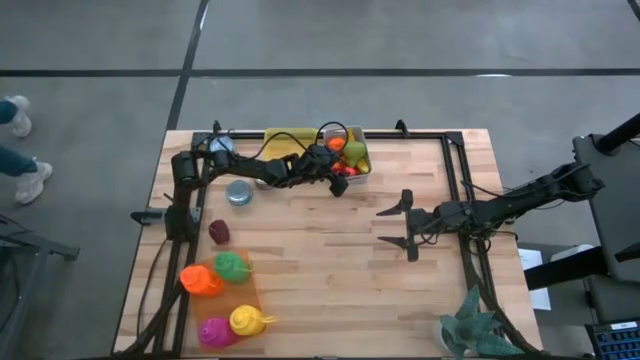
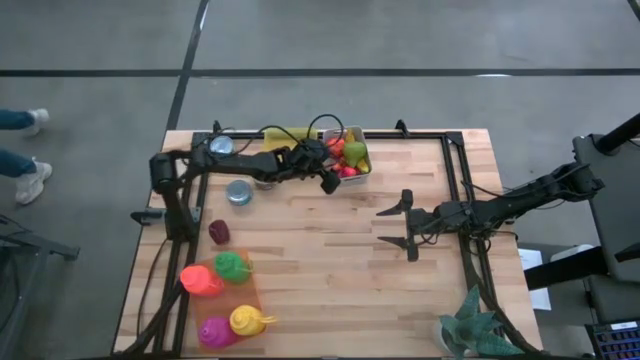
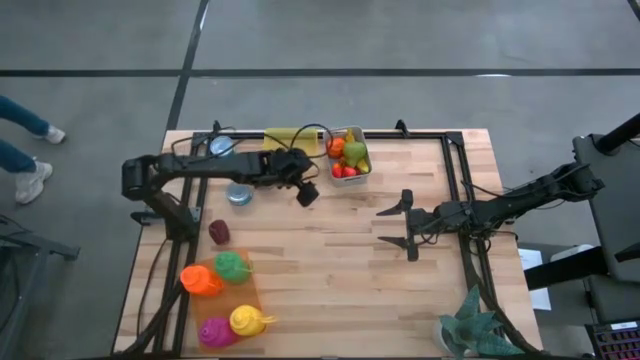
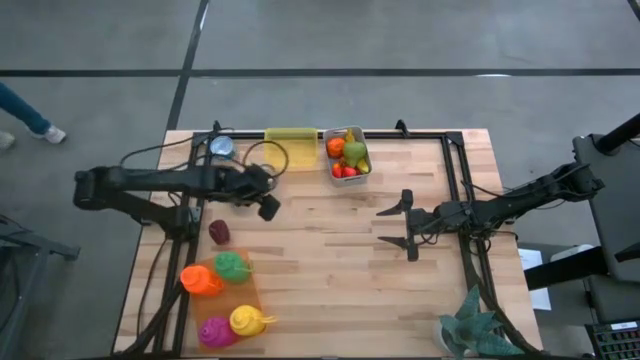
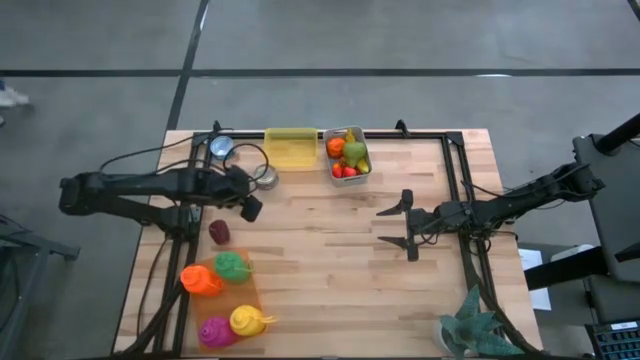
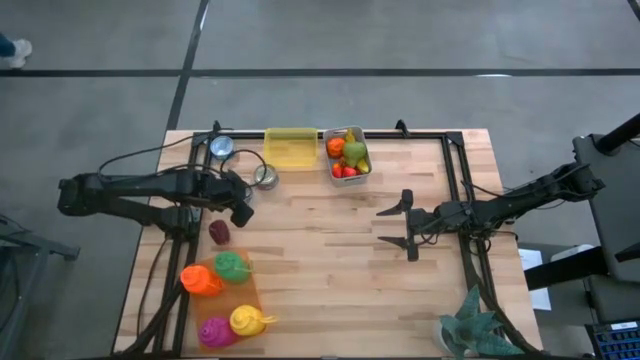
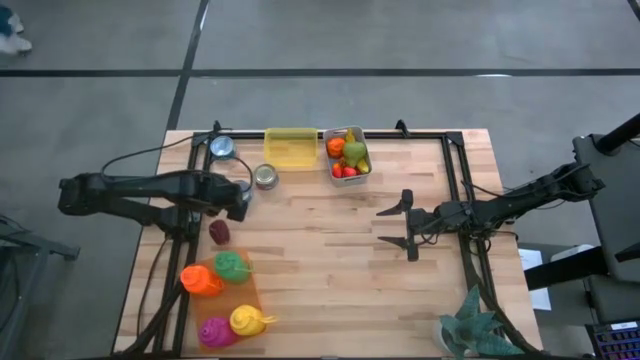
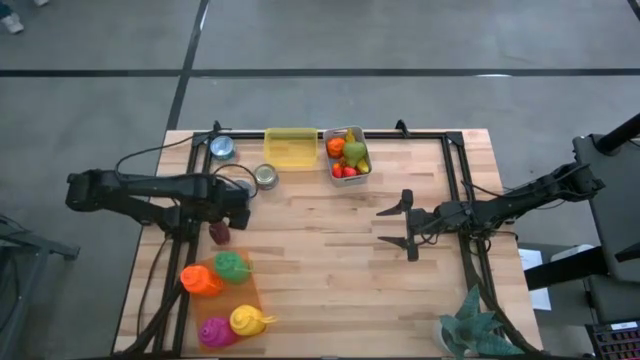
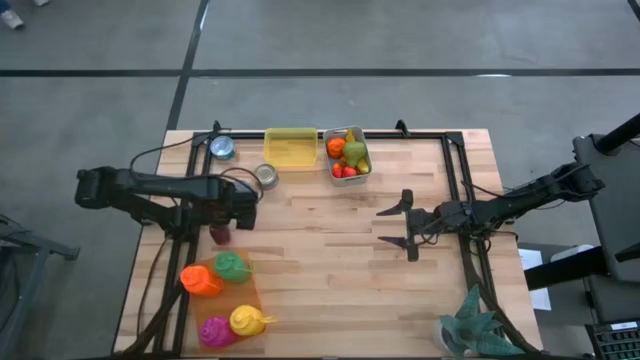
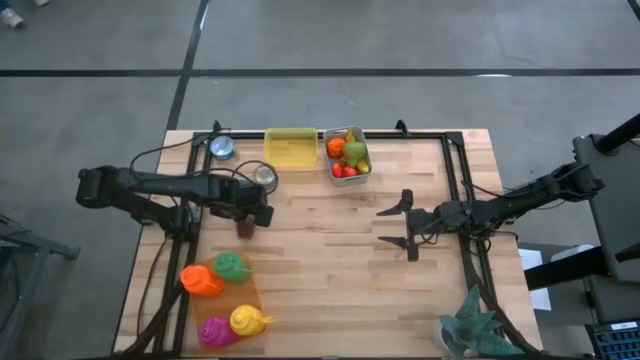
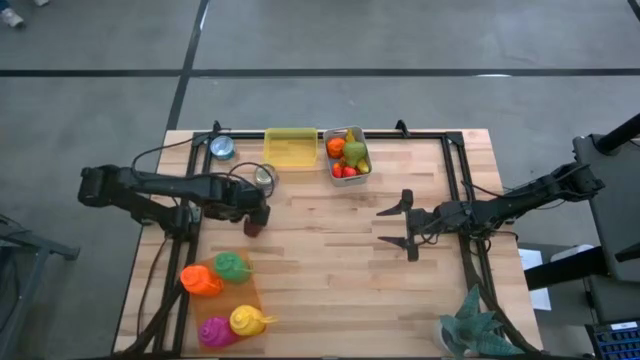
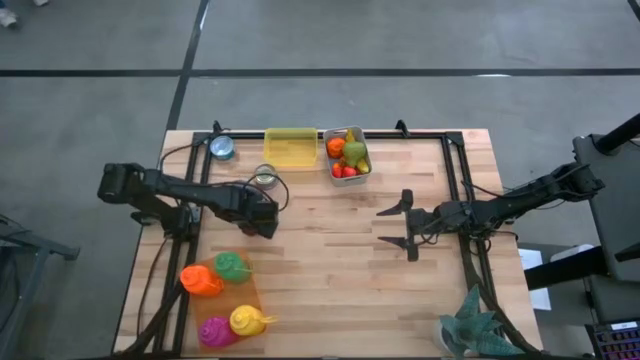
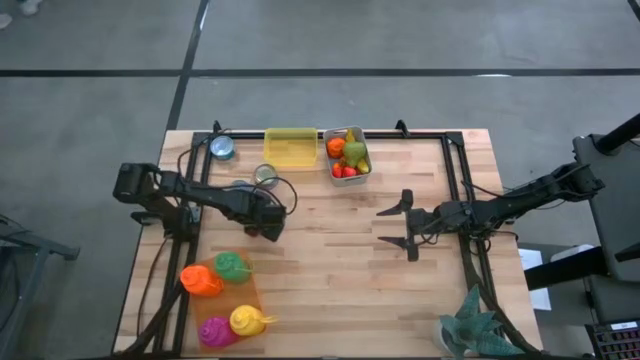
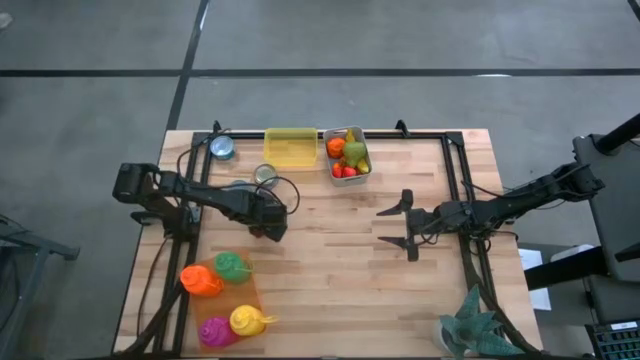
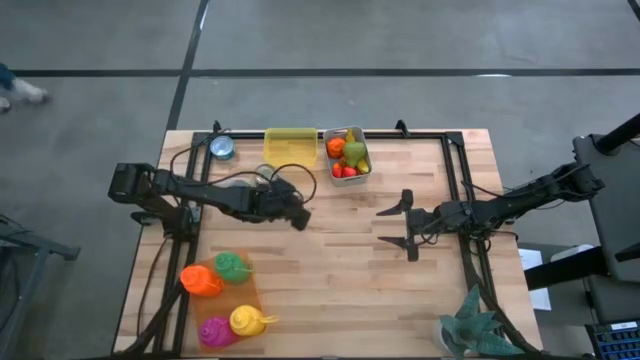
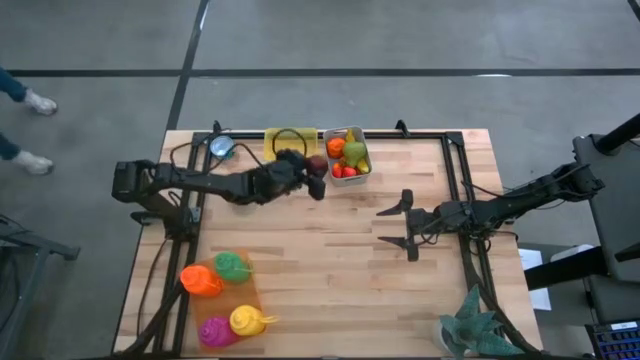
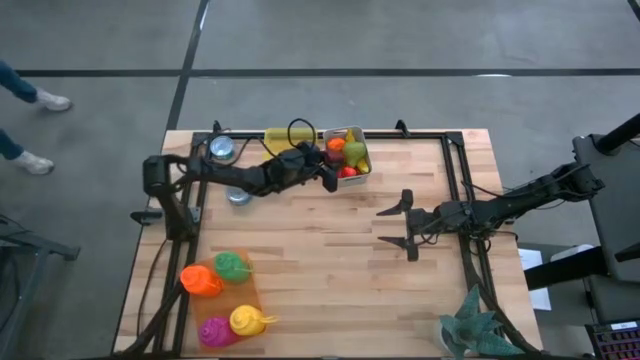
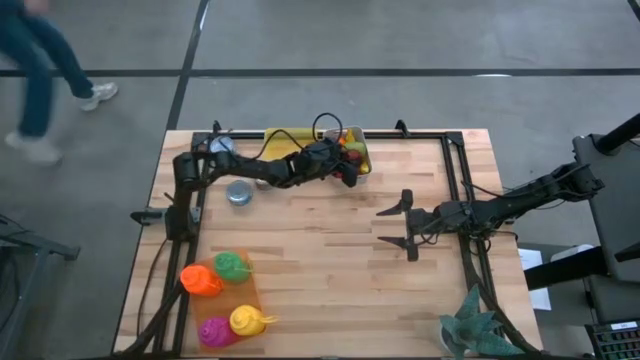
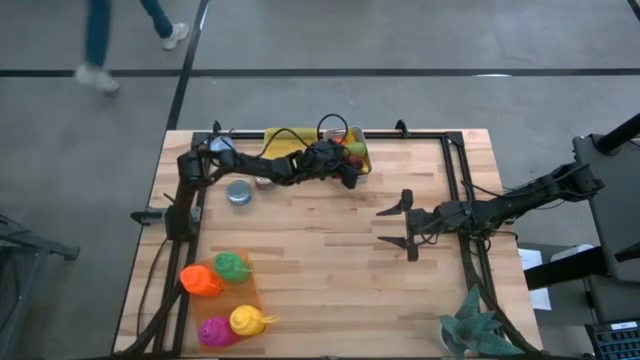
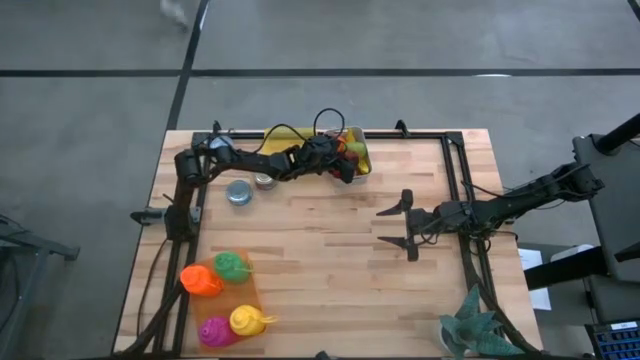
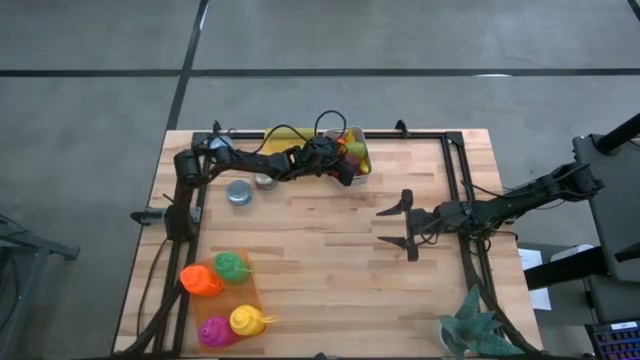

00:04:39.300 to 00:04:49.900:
Task: Pick & Place Food Item
Put the apple into the gray bin

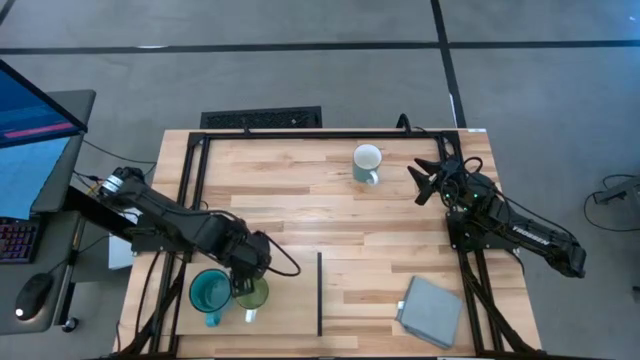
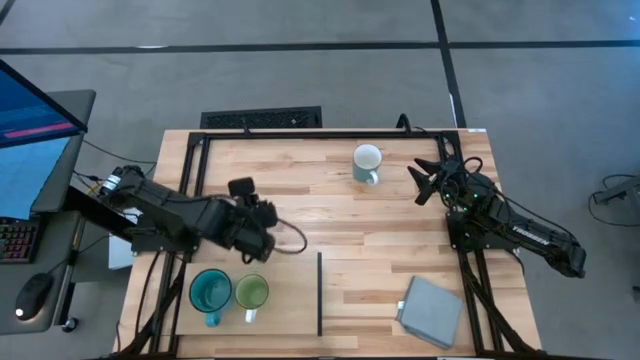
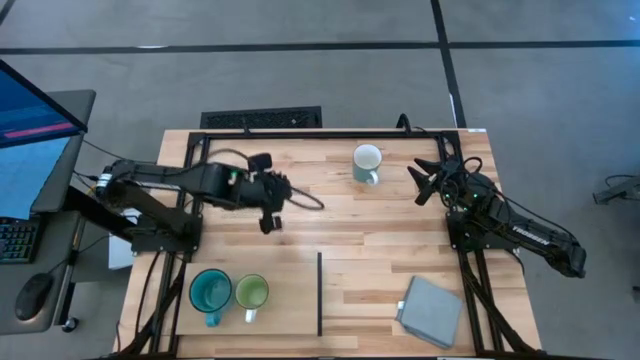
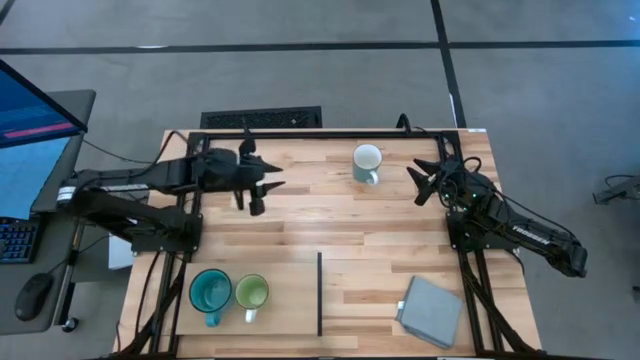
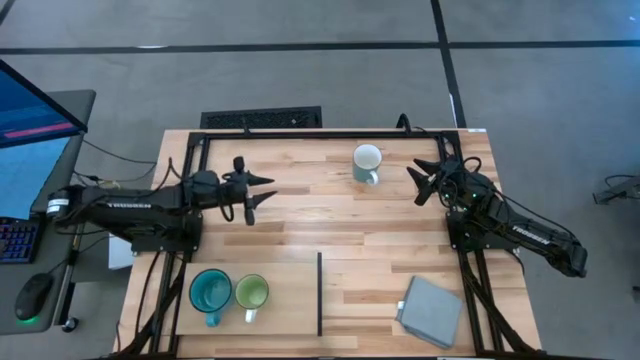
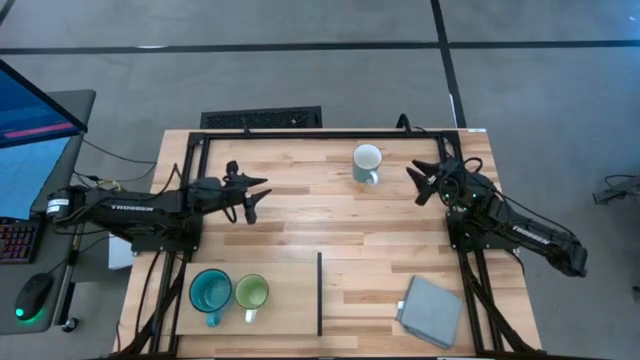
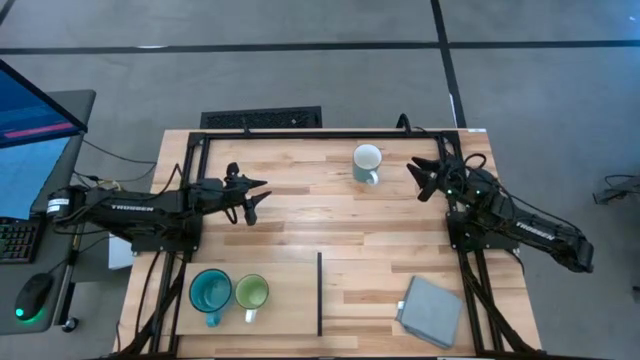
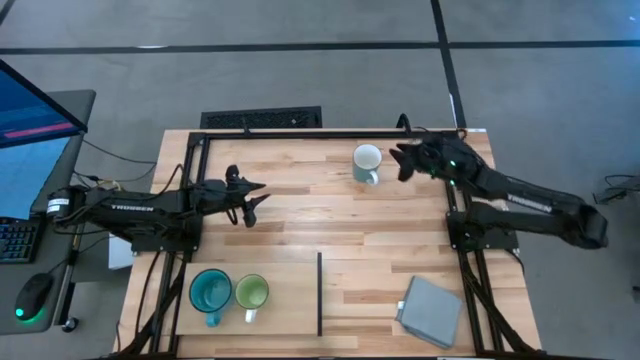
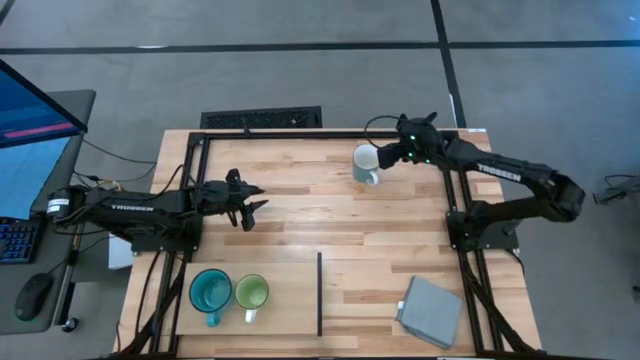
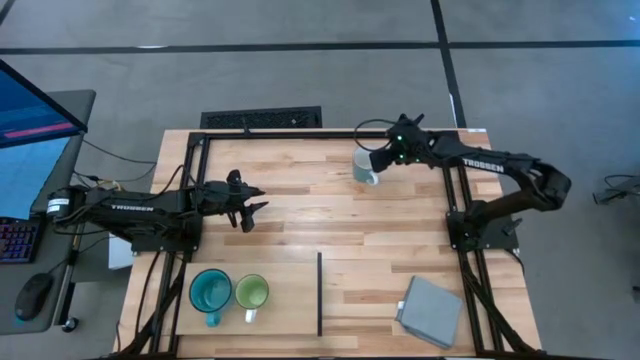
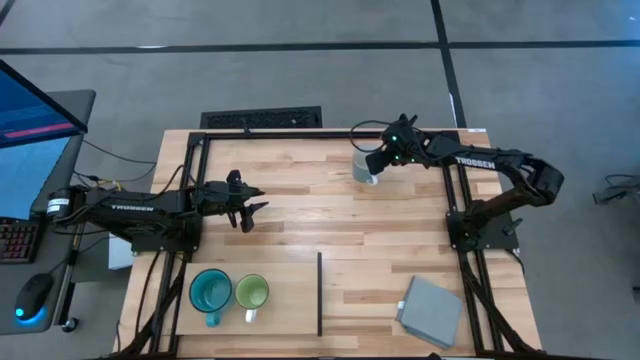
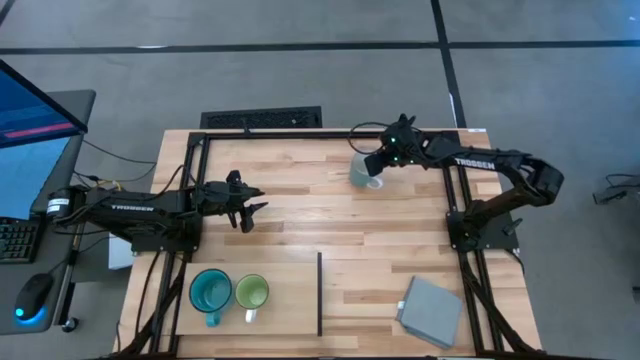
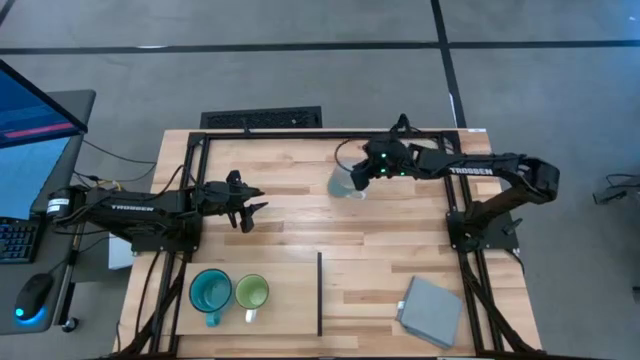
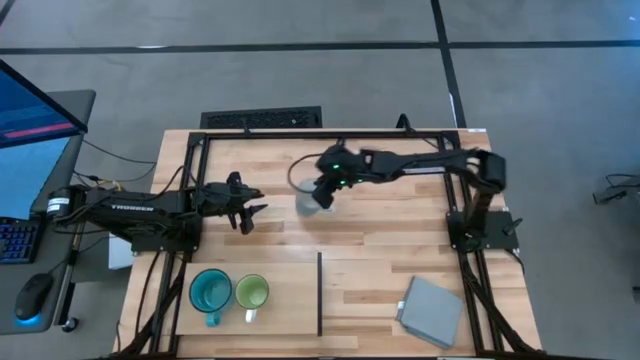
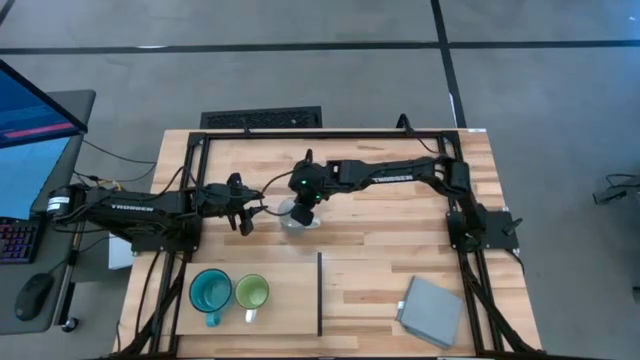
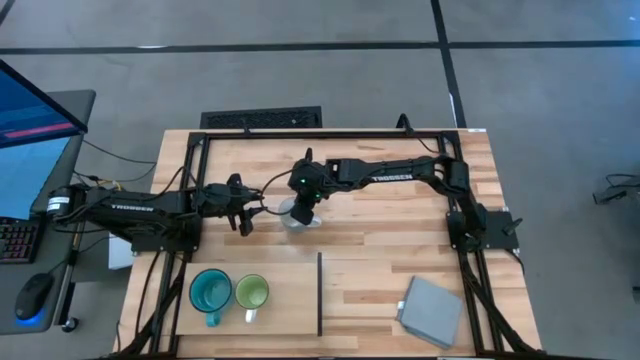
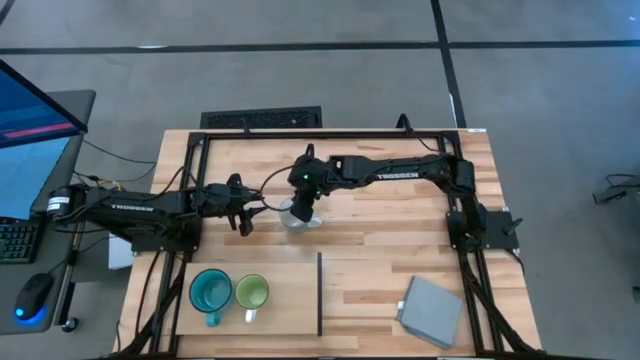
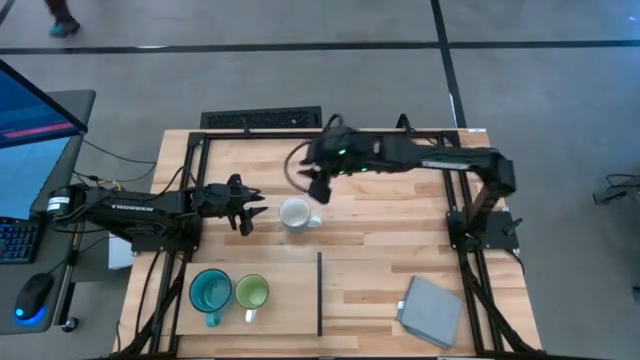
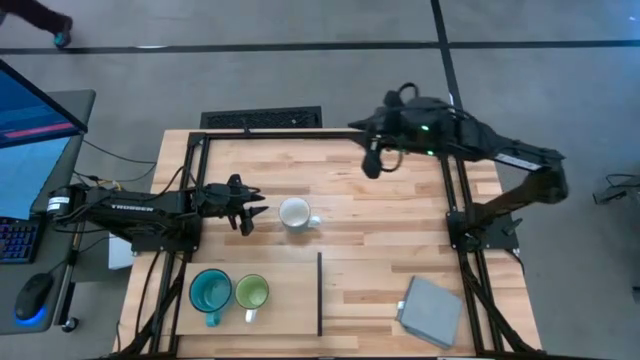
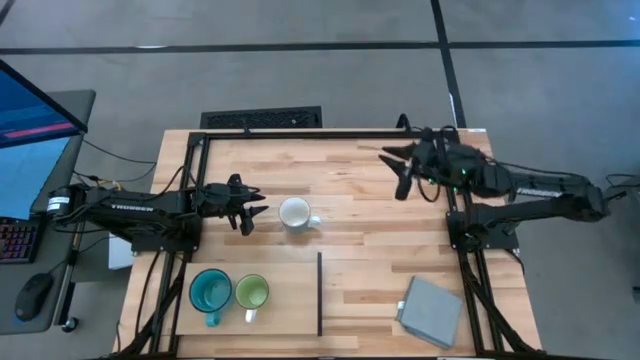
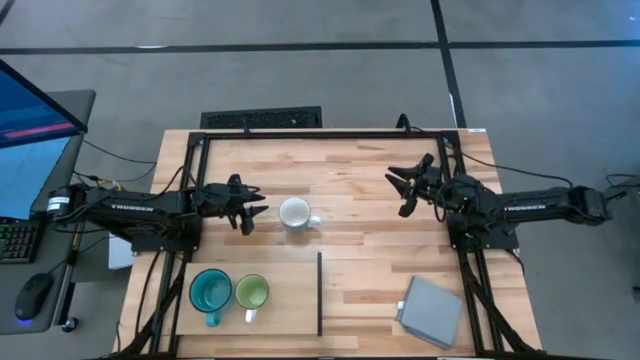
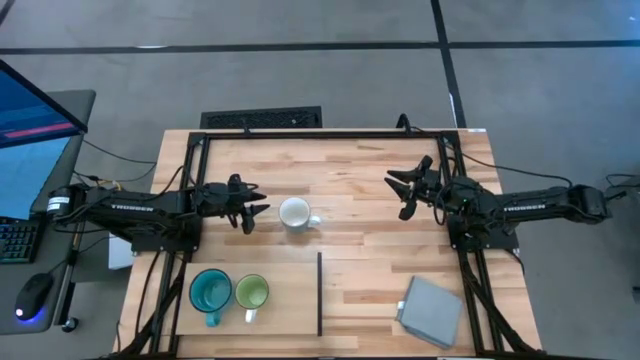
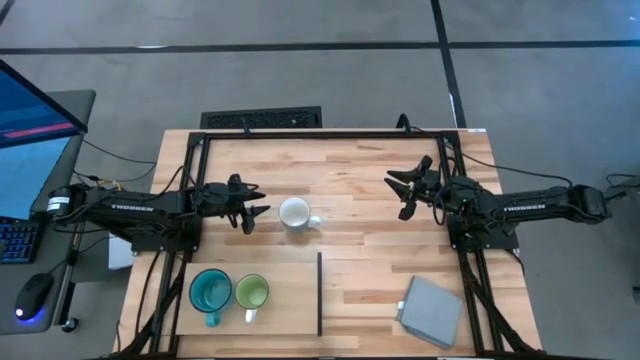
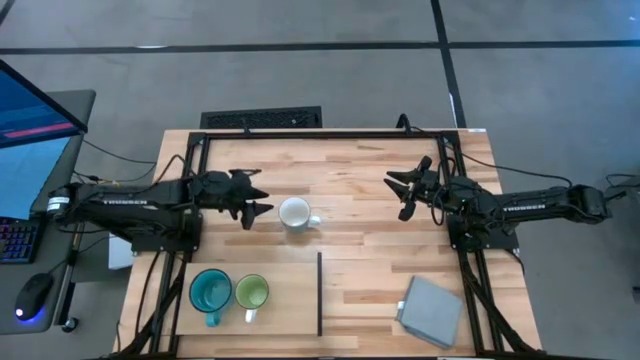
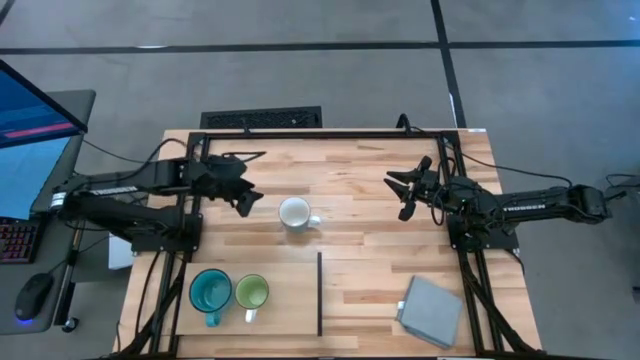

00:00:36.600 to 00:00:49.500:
Task: Stack small to large cups/mugs on shelf
Put the white mug on the shelf
